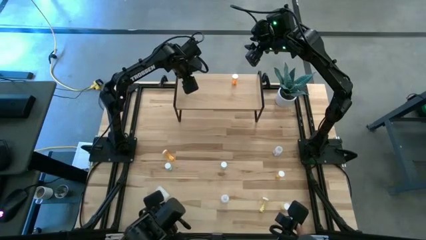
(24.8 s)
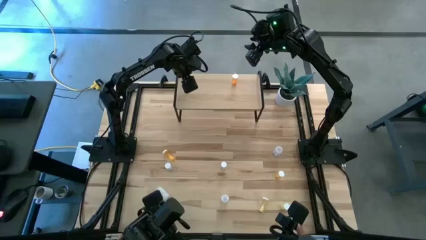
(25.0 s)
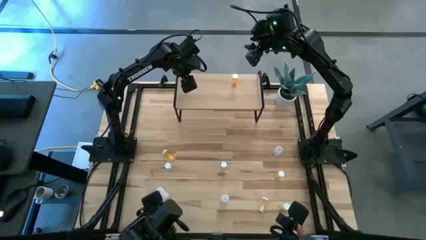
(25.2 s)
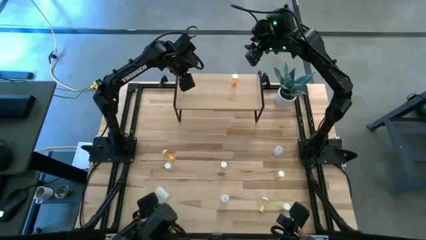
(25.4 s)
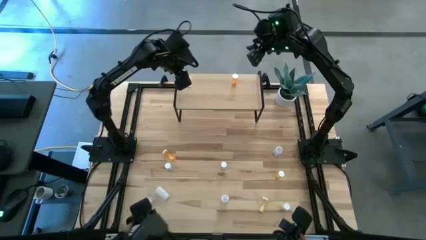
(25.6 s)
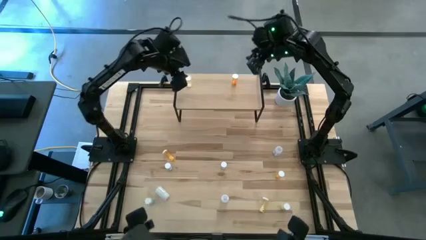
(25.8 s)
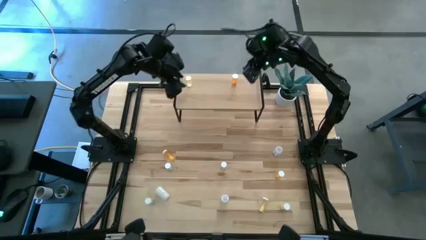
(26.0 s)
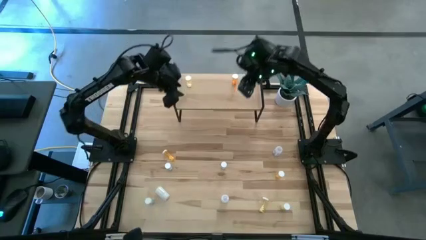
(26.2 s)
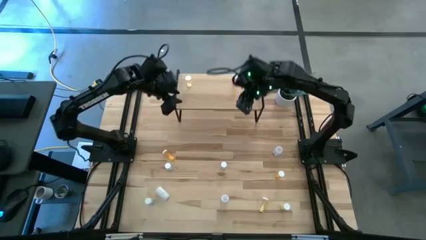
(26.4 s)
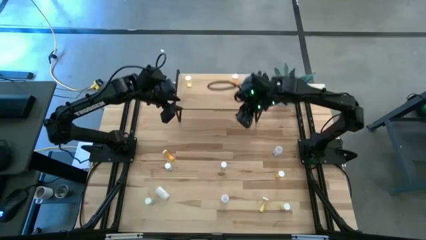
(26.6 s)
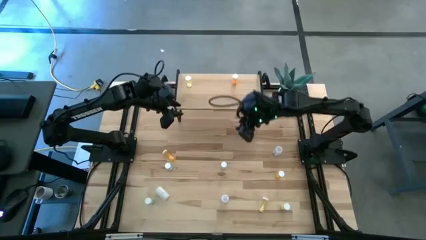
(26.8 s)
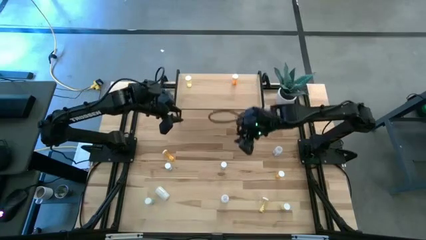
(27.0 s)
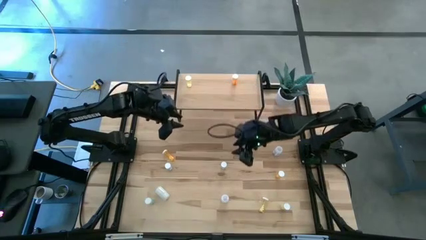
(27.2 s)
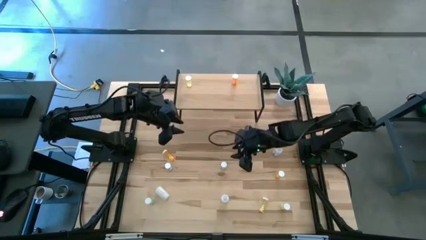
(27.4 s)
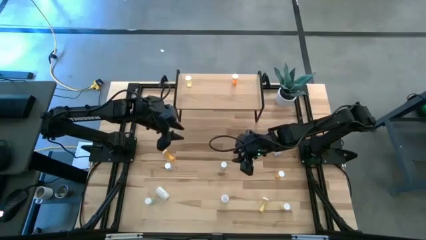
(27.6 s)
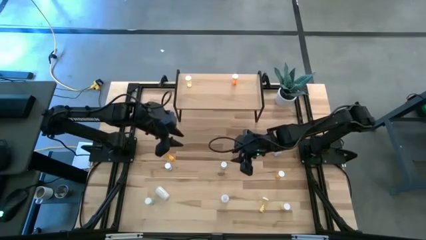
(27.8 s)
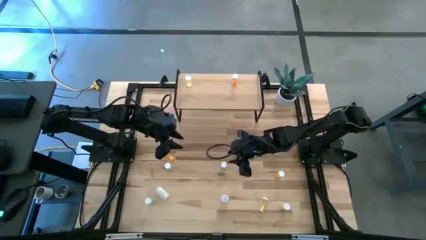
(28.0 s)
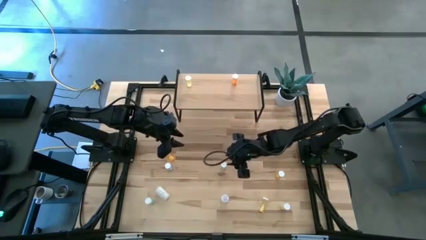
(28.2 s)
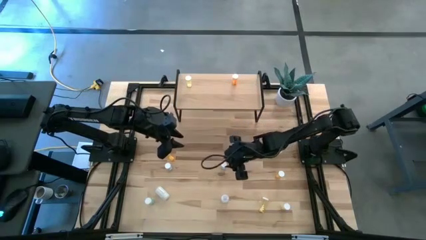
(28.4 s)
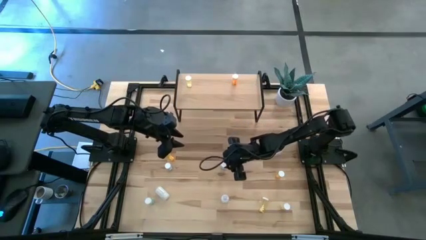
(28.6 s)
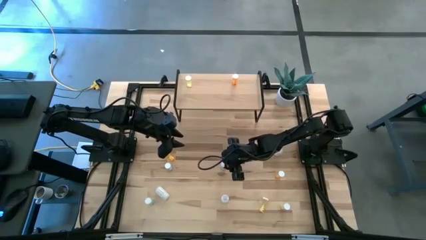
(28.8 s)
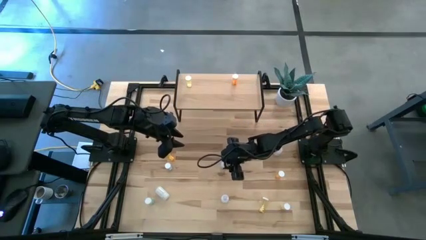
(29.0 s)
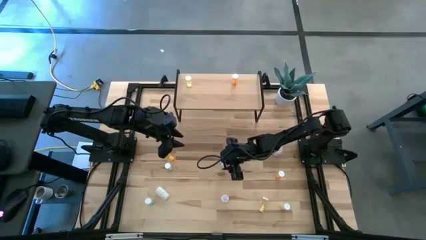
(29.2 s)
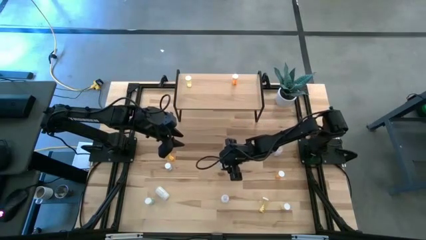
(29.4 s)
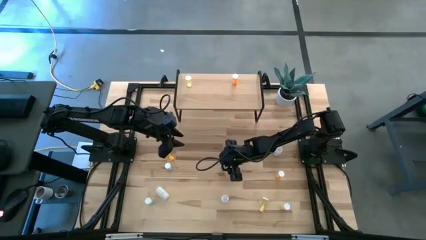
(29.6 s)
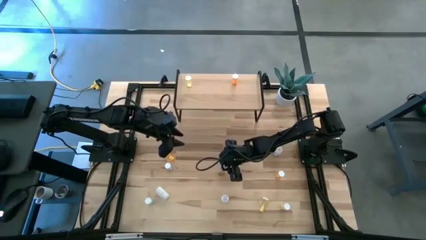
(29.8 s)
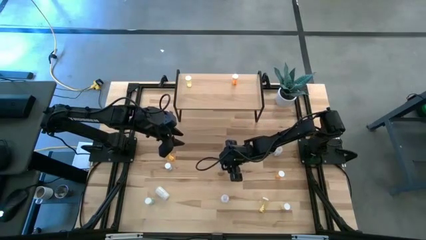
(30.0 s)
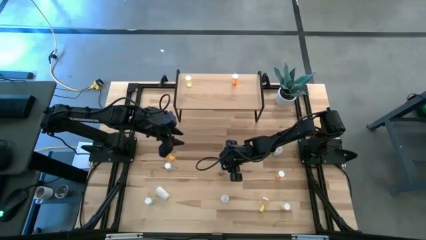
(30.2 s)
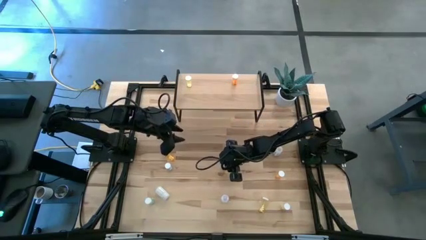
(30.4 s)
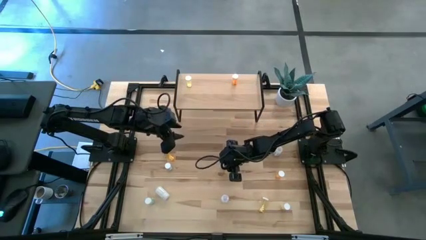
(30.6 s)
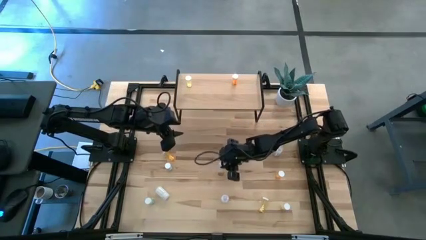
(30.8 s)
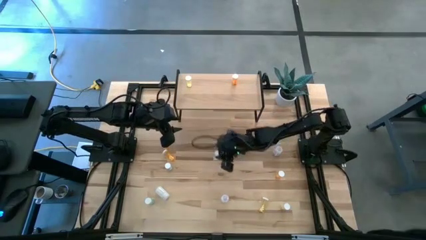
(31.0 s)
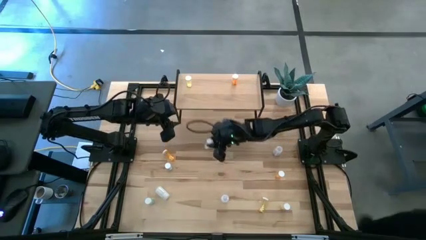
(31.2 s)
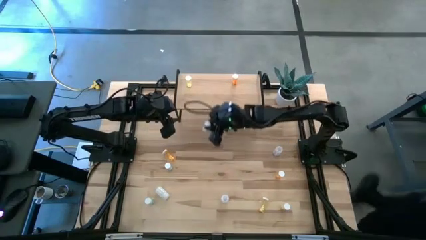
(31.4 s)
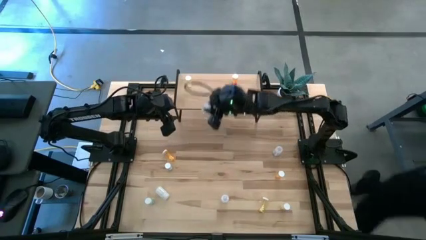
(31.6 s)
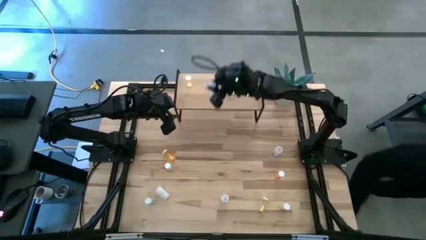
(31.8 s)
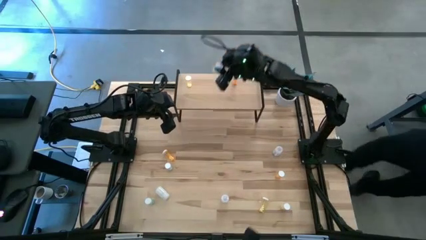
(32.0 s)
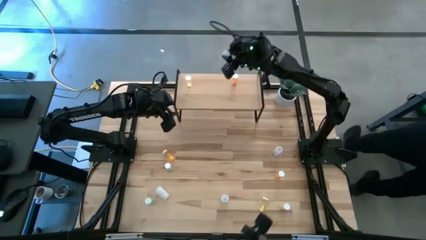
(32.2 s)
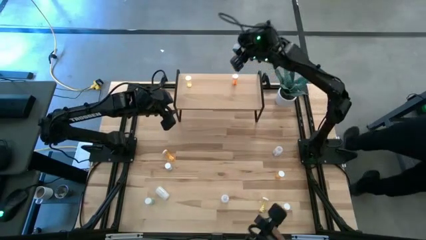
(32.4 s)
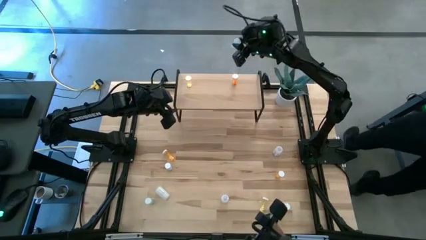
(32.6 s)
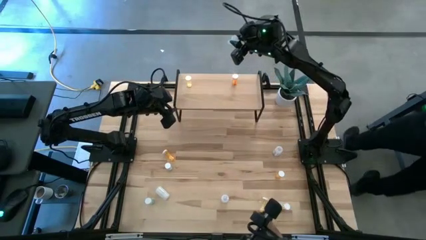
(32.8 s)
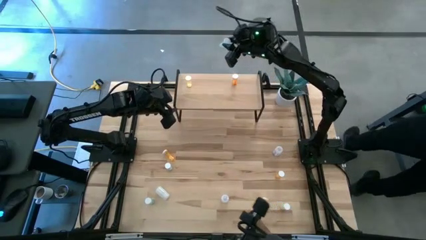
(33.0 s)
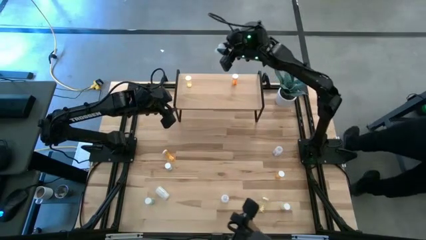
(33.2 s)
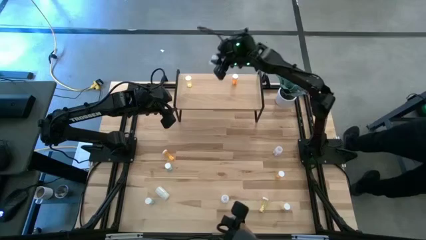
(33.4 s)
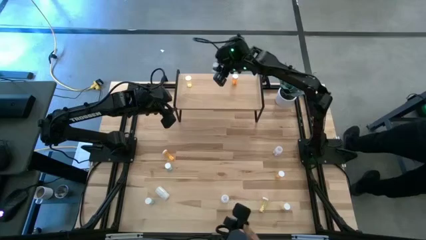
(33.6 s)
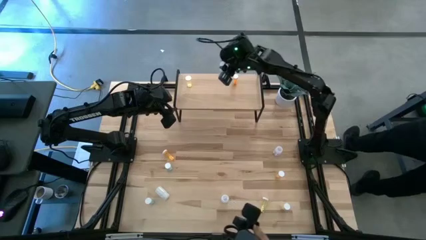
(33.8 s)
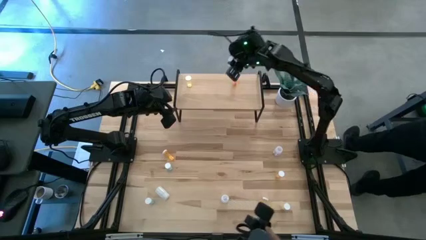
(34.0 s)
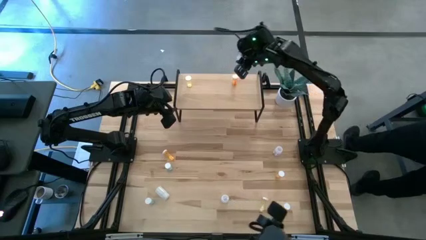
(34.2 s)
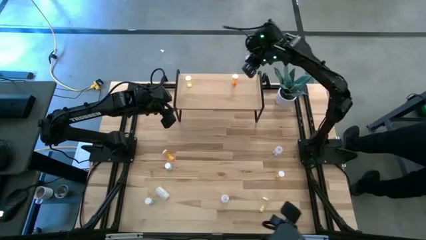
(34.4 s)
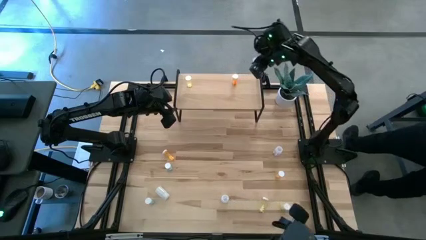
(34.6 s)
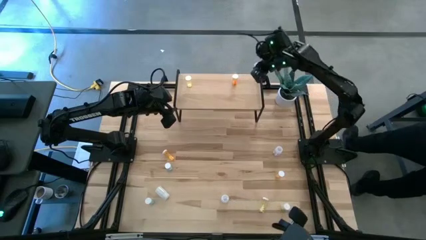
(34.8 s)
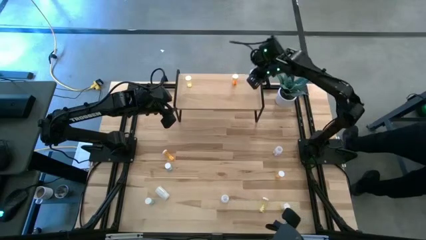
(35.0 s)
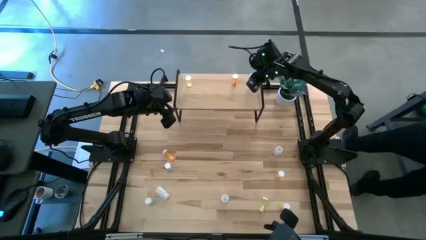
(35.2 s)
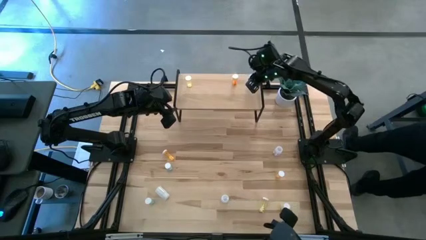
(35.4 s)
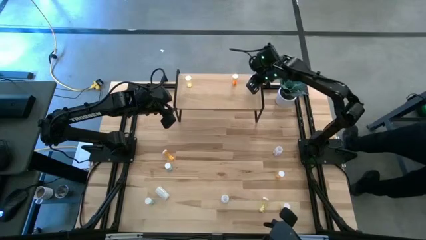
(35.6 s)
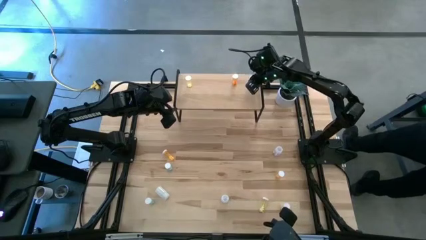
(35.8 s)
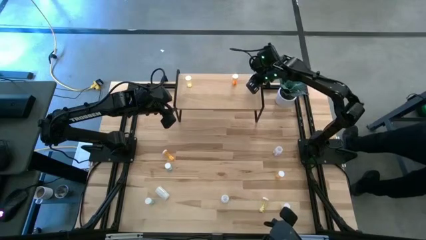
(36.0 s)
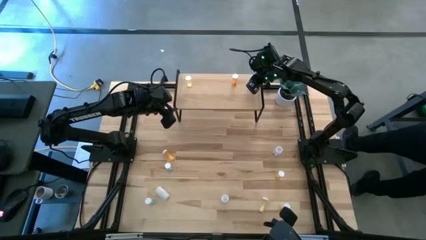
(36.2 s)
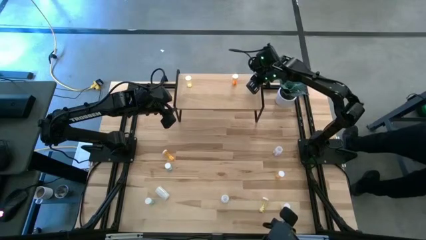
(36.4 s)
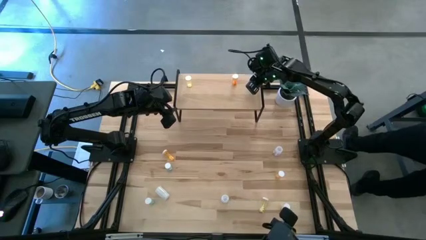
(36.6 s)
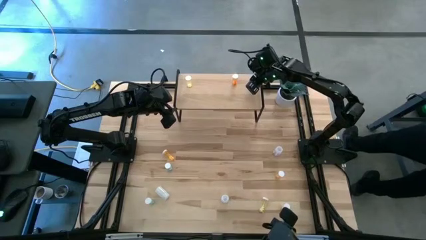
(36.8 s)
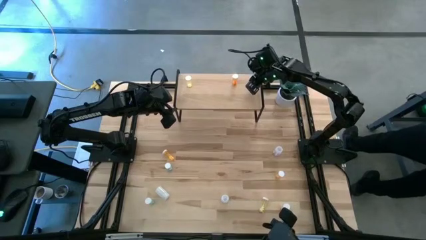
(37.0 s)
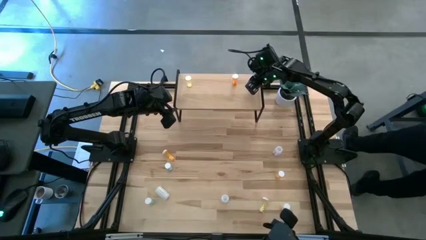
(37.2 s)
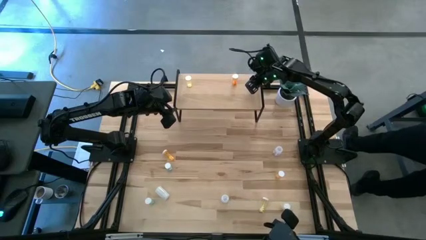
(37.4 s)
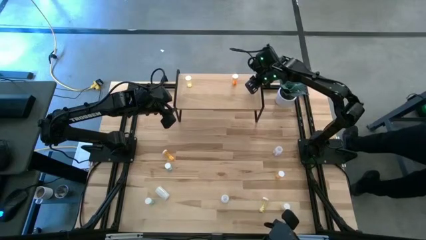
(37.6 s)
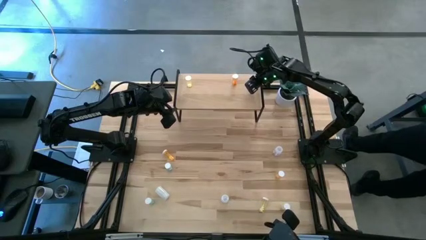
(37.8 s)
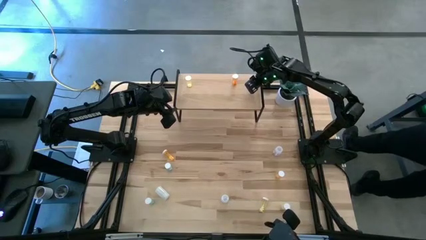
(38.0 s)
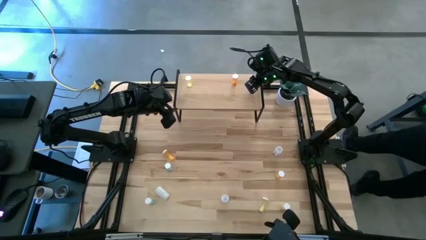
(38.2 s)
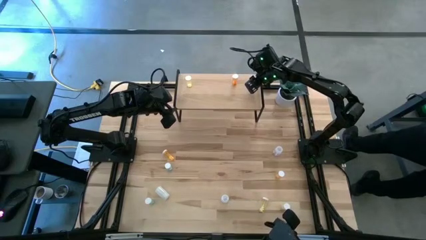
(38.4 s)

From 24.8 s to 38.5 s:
Task: Pick and place medicine bottles onto shelf by color
Put the right blue medicine bottle on the shelf

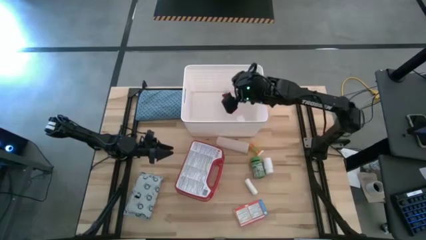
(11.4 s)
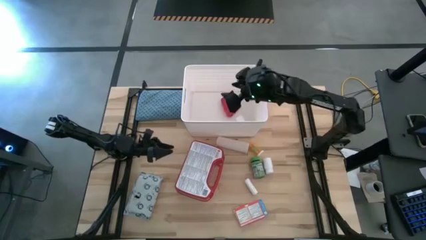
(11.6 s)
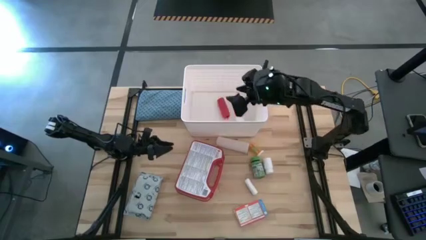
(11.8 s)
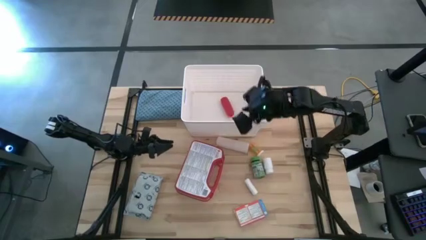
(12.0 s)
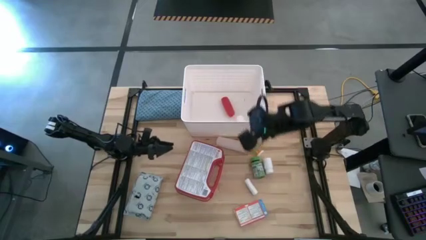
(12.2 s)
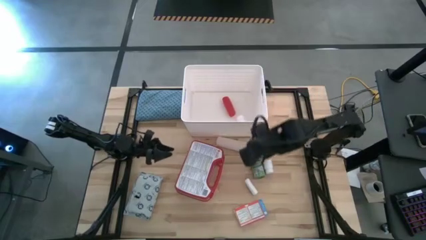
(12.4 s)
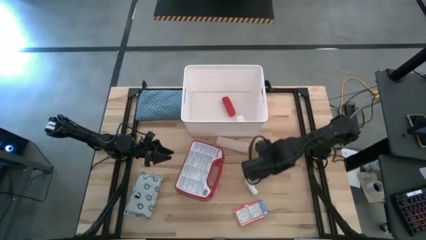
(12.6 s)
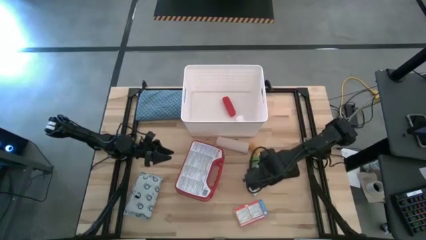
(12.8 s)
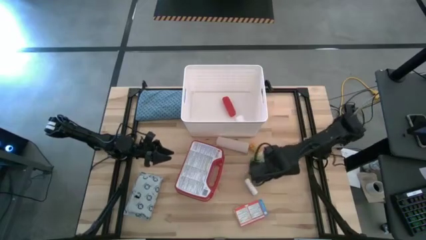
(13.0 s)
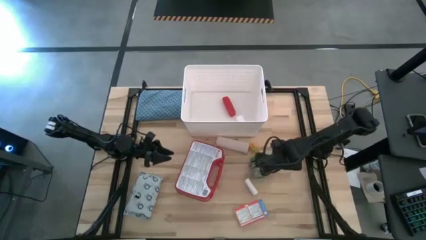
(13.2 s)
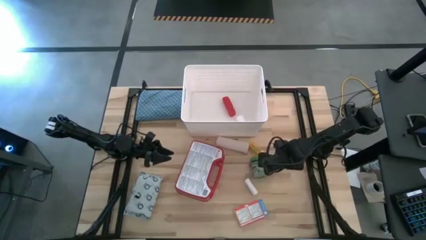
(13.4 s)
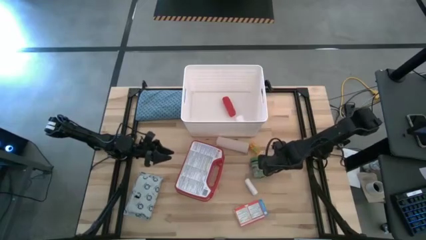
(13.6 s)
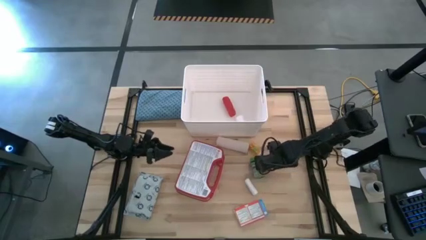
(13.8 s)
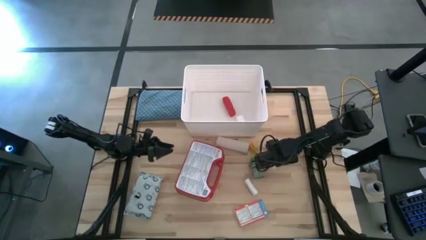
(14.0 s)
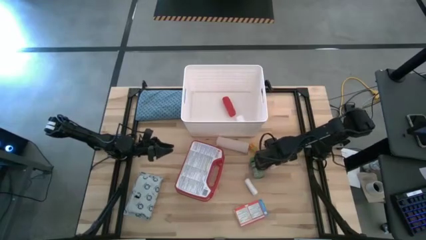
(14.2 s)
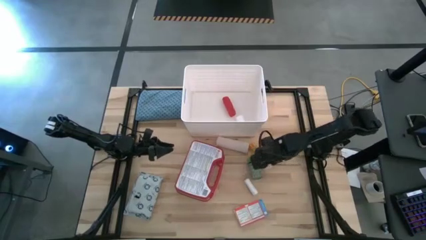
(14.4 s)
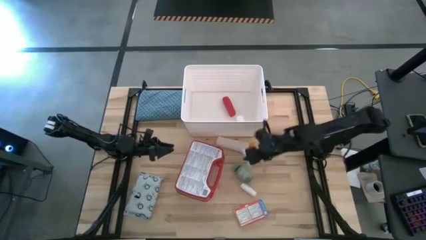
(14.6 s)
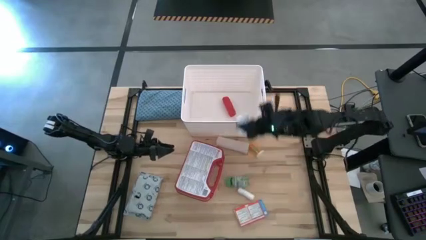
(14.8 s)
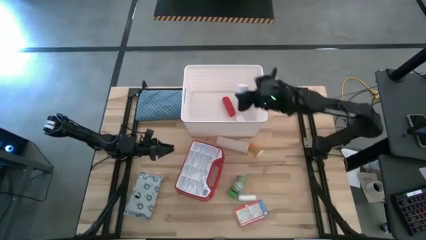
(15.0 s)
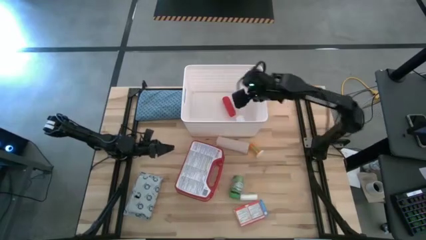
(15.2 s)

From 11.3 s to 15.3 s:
Task: Pick & place medical supplies in basket/bin
Put the white pill bottle into the white bin
